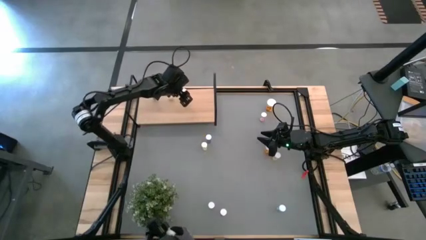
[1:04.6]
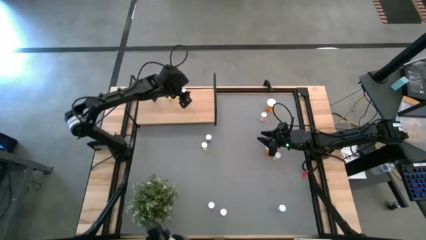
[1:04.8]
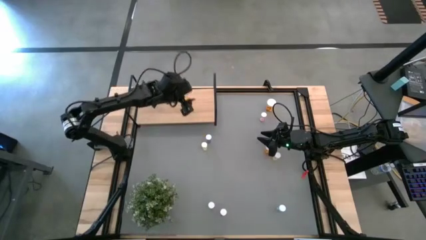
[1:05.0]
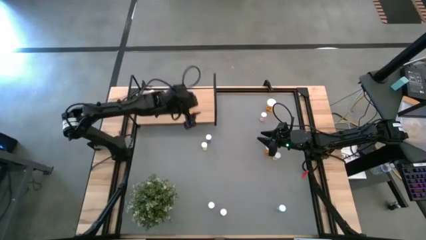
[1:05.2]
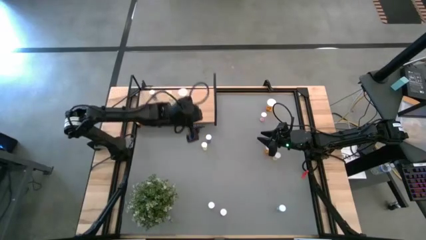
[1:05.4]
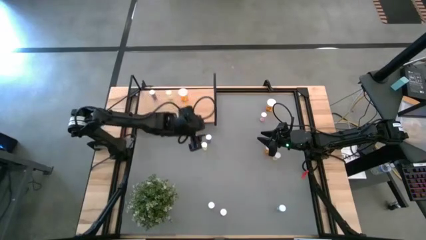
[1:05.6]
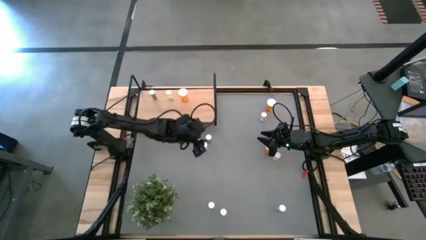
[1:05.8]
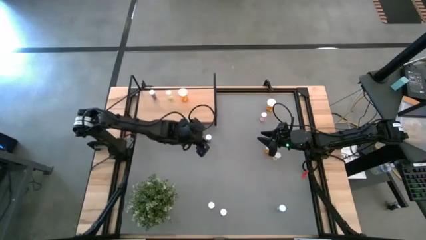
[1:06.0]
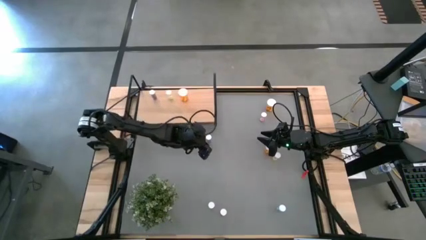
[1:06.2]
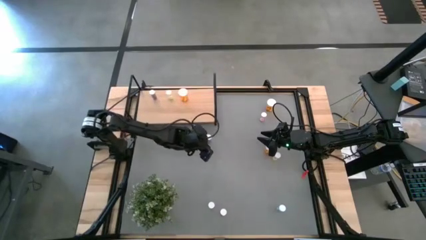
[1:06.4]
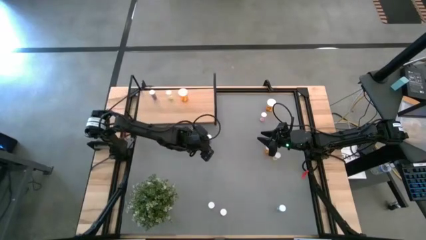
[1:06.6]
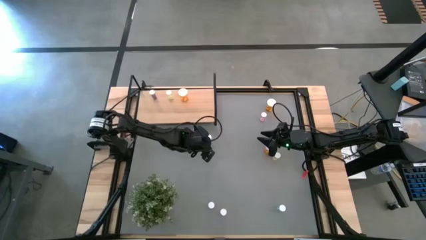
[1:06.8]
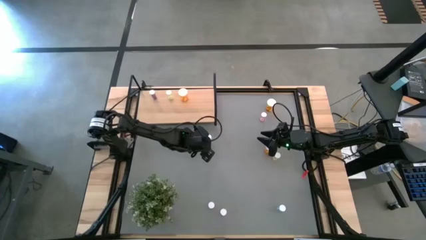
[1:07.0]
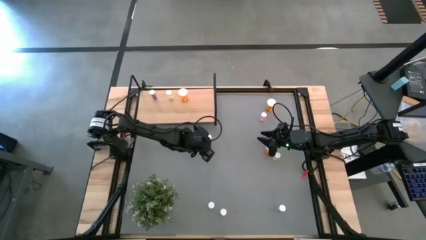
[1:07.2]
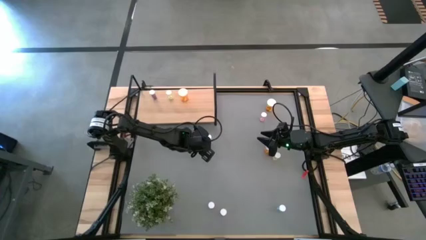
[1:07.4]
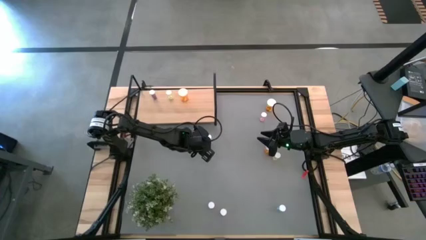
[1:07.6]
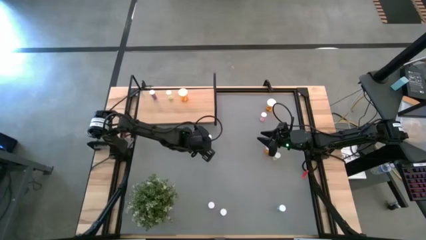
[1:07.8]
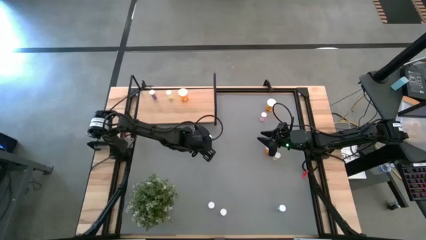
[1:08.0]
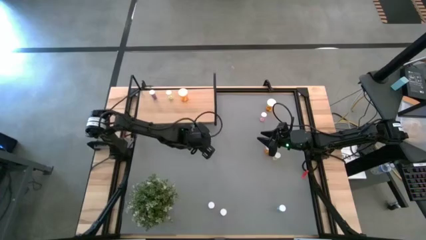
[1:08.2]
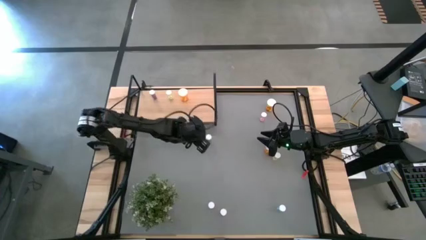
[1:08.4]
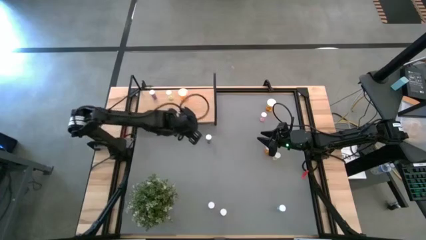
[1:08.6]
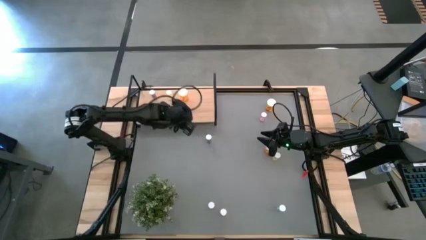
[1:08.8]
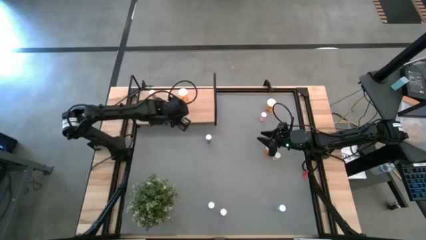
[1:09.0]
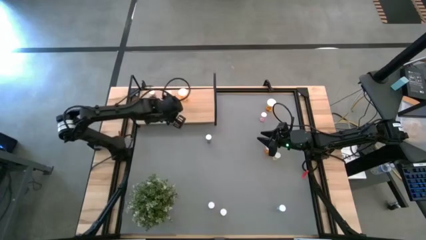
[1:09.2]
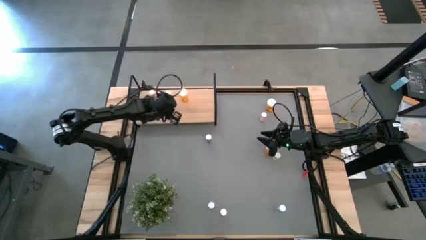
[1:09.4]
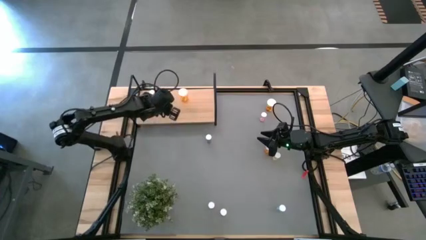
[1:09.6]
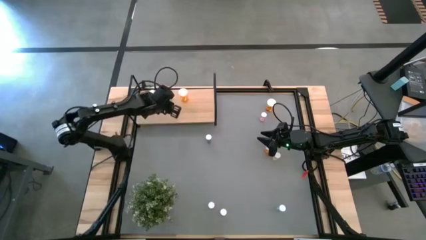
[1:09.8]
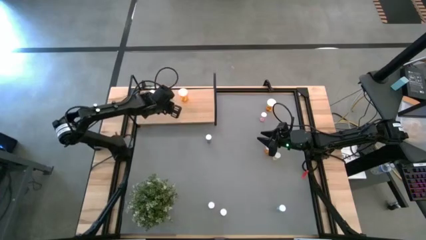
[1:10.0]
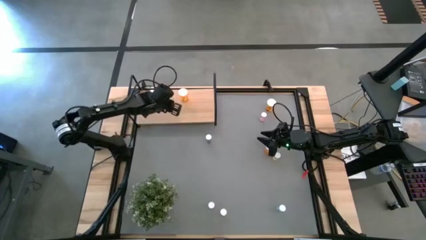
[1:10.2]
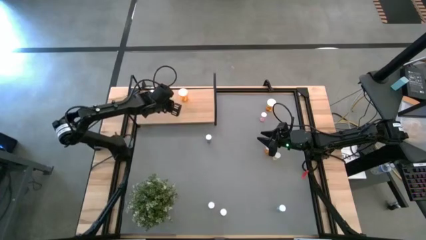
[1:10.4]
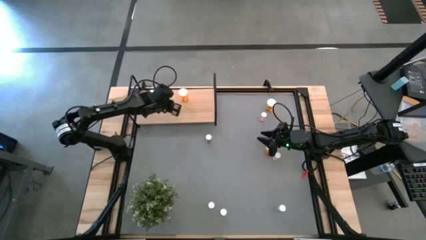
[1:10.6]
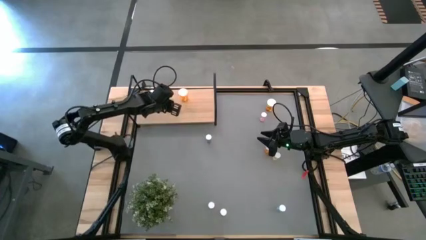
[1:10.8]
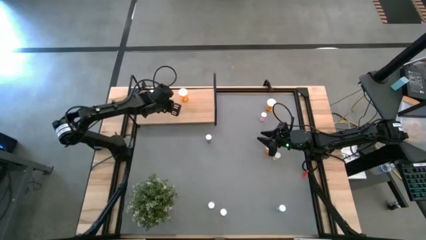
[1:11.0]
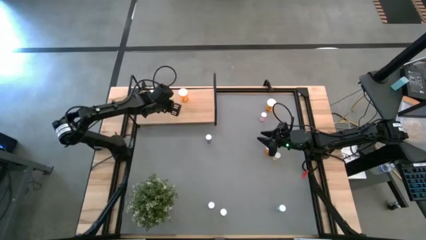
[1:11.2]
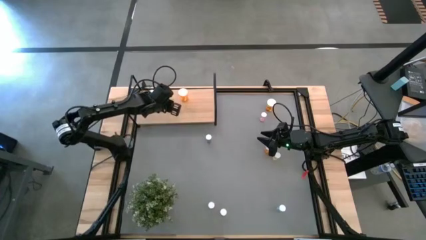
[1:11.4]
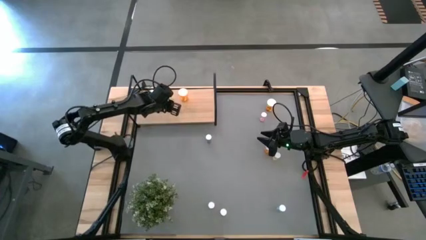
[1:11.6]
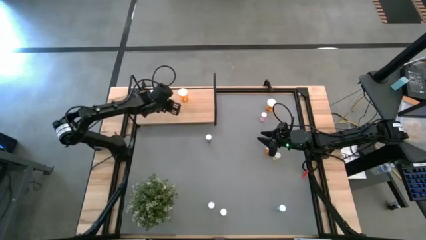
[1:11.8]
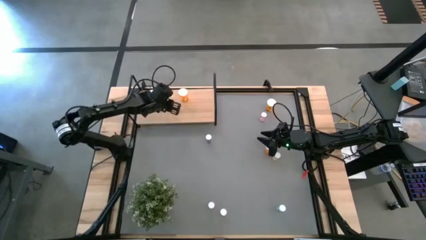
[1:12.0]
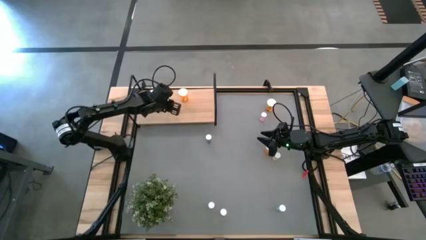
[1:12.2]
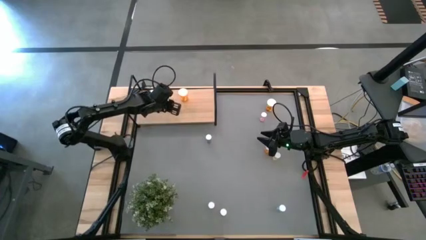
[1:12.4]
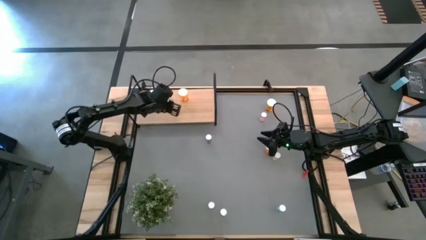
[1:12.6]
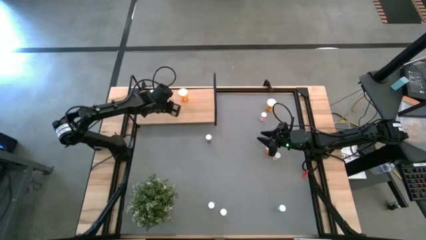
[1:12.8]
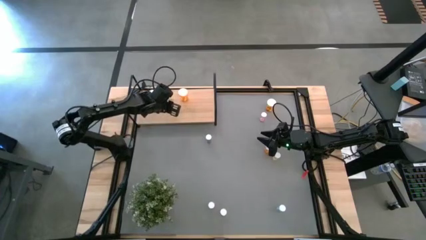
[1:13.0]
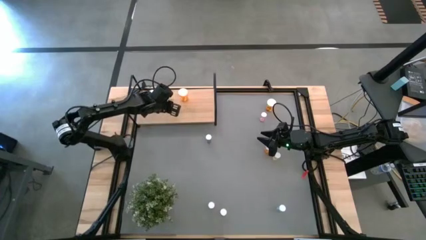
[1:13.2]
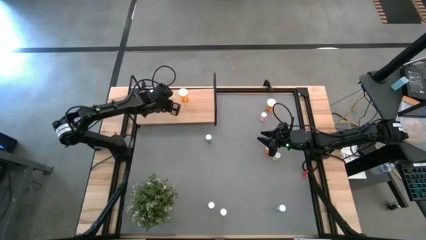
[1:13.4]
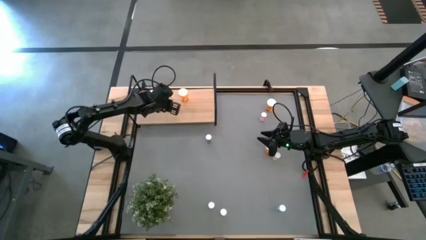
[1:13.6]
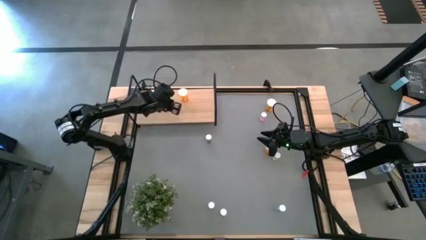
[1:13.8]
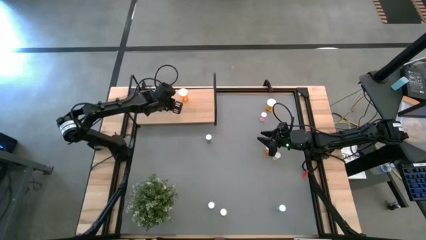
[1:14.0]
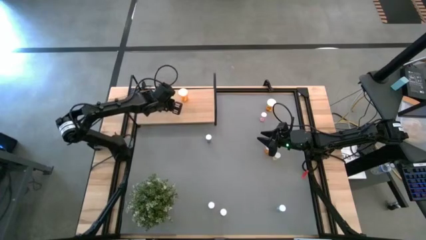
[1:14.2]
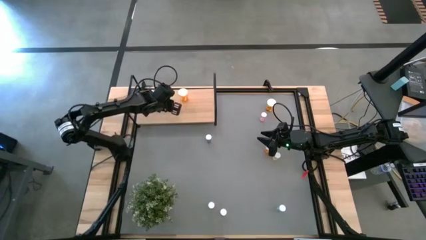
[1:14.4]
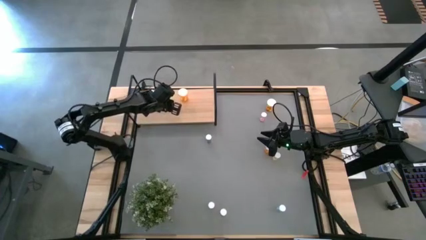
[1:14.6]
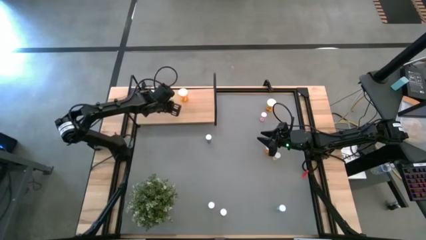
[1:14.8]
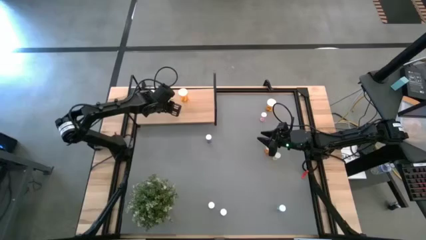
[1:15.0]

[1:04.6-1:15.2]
Task: Pick and place medicine bottles onto shelf by color
Put the left yellow pill bottle on the shelf

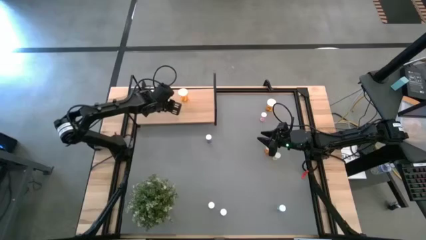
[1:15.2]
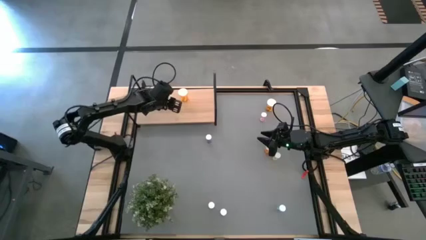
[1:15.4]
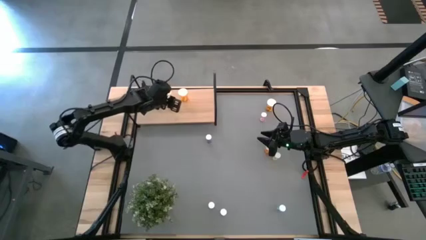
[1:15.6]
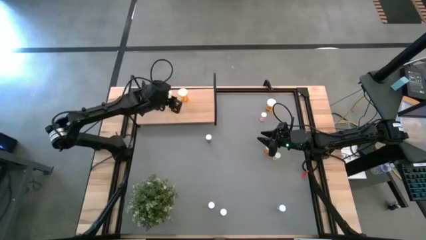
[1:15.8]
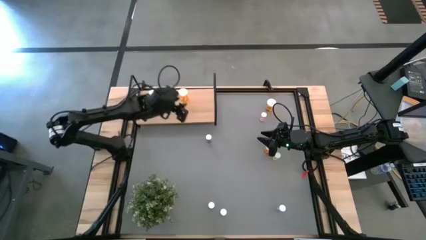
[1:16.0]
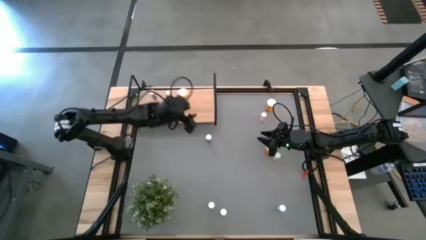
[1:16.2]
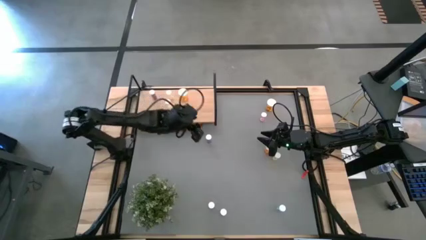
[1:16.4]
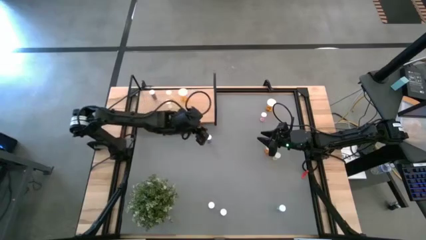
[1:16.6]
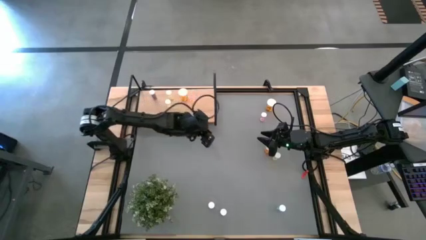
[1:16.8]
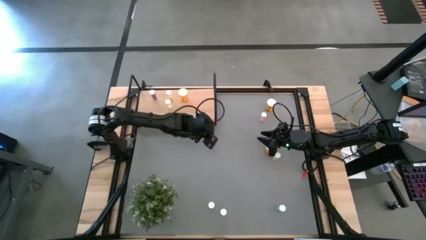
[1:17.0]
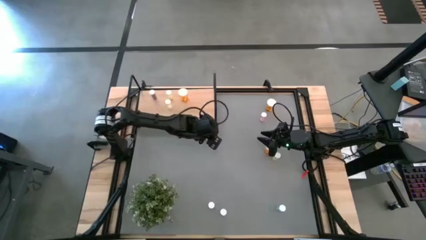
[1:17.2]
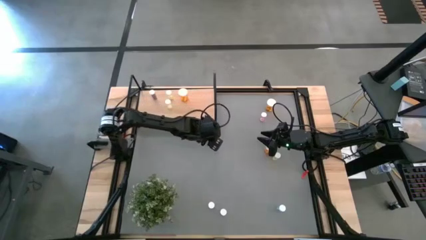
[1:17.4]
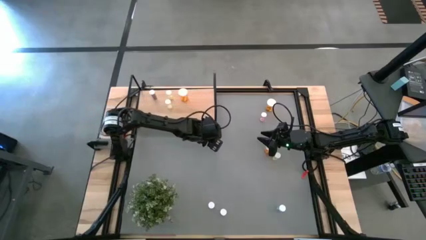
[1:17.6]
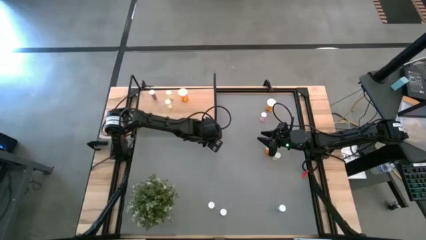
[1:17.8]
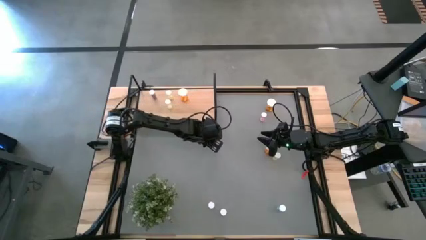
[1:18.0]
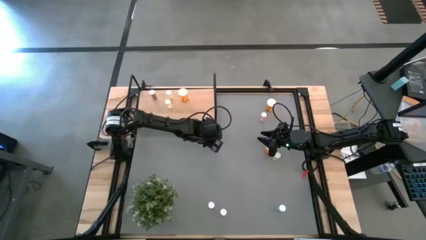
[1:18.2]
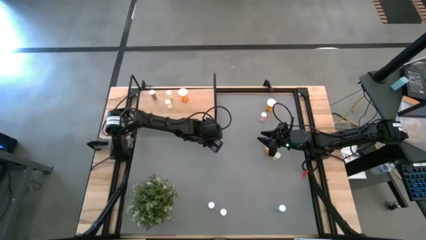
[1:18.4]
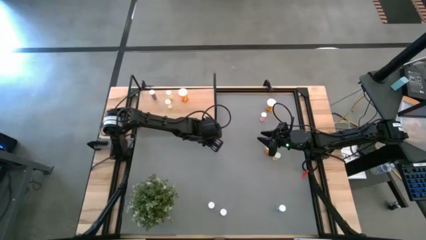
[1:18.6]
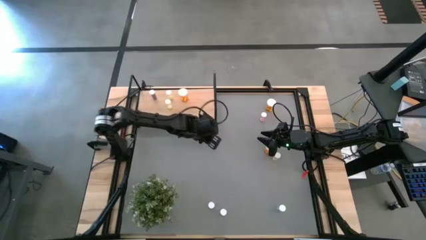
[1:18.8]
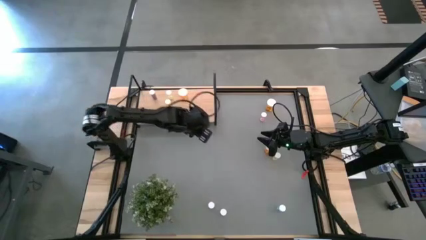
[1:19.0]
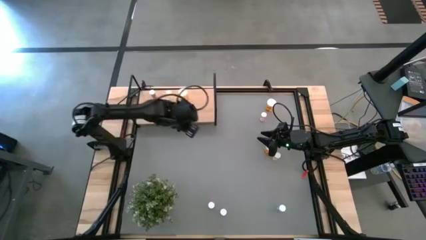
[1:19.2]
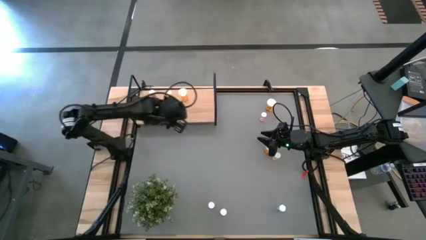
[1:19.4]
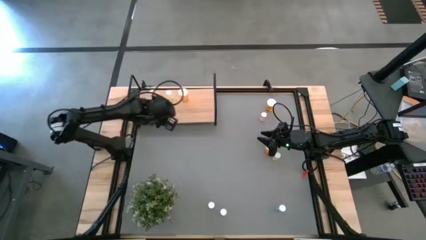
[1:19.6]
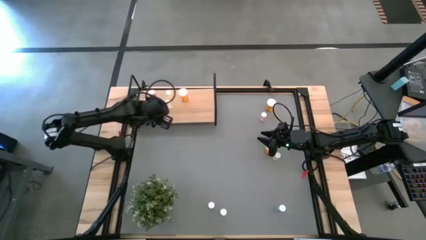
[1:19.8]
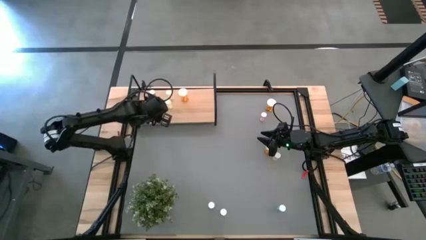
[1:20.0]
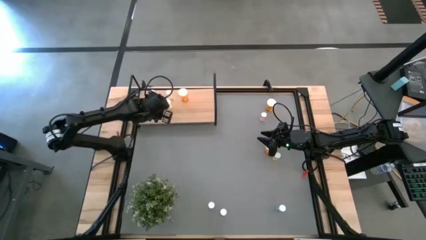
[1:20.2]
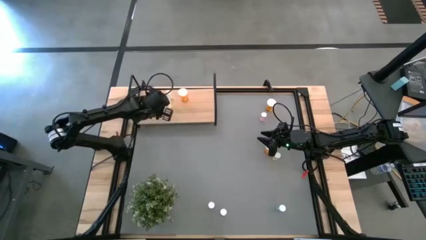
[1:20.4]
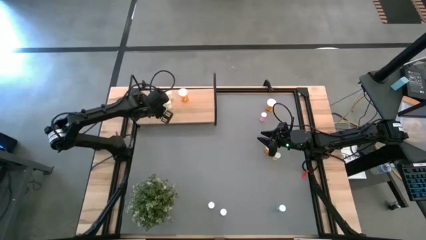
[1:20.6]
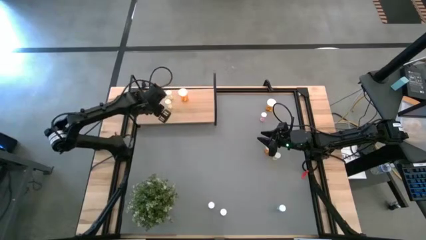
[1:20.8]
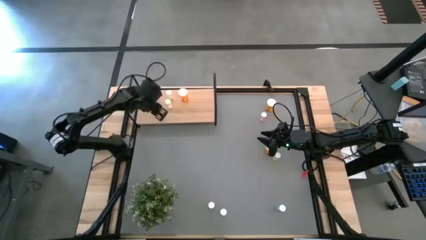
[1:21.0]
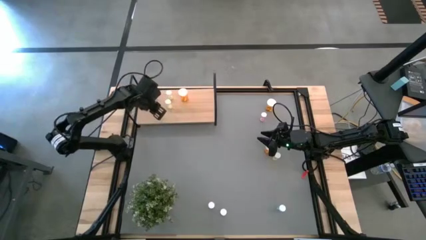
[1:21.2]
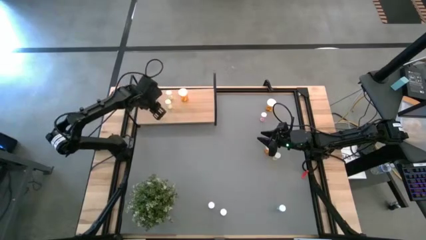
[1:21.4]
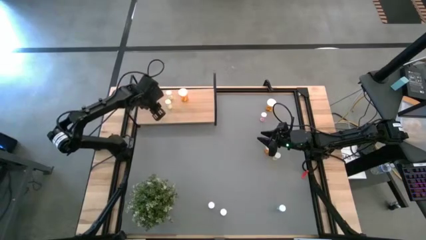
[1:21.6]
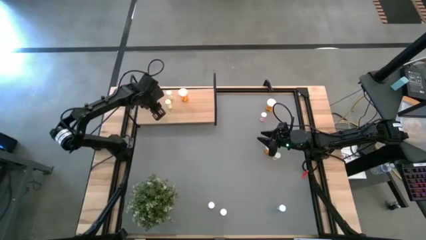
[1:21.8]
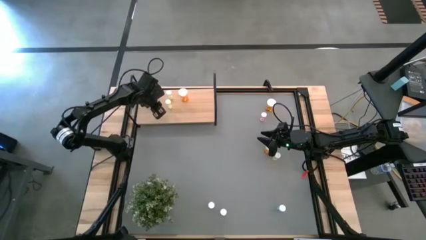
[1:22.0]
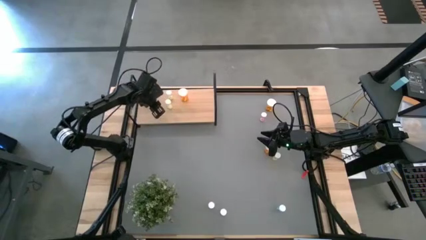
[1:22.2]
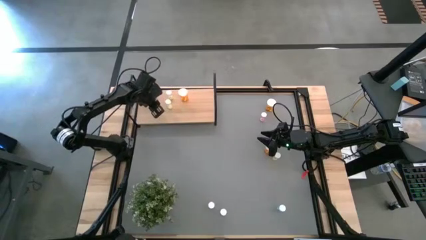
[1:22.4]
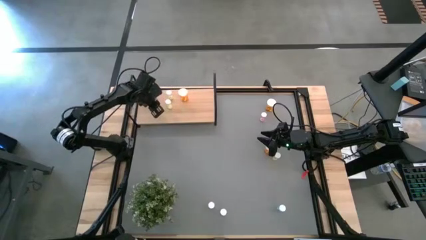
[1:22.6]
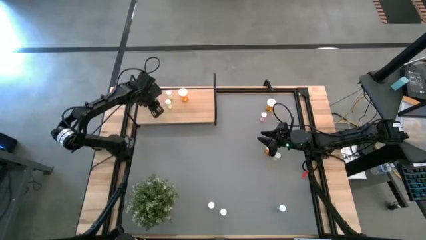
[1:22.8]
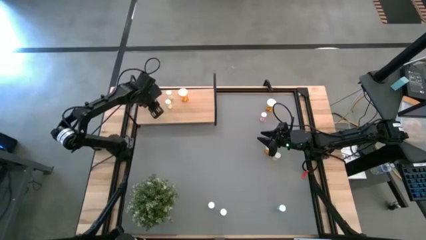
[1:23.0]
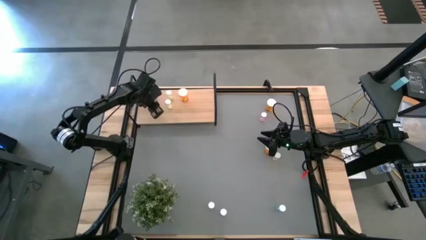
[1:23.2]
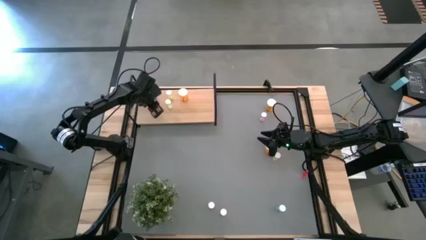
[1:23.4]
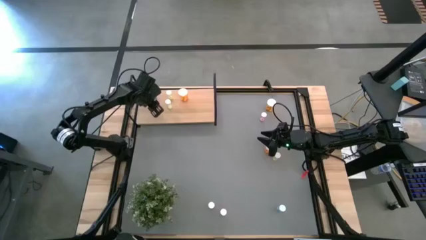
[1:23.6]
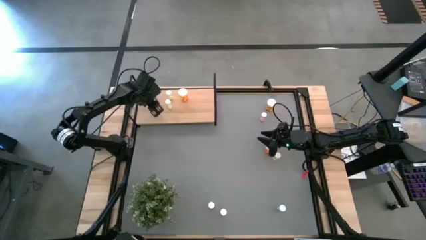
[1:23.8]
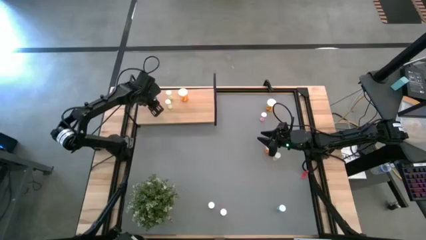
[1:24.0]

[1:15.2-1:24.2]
Put the top blue pill bottle on the shelf
